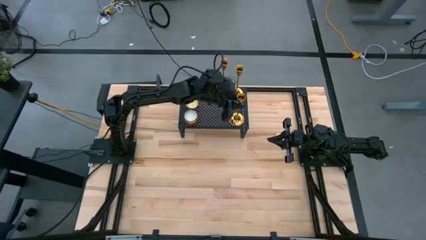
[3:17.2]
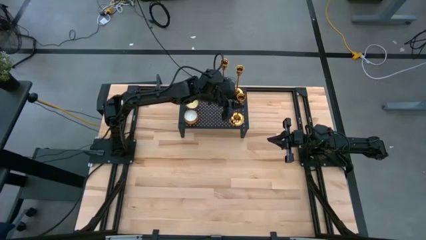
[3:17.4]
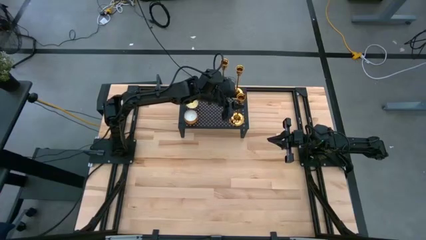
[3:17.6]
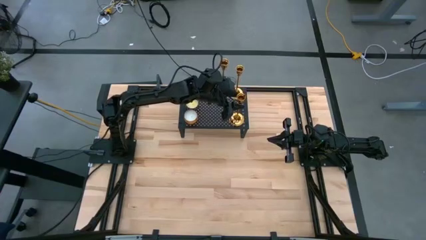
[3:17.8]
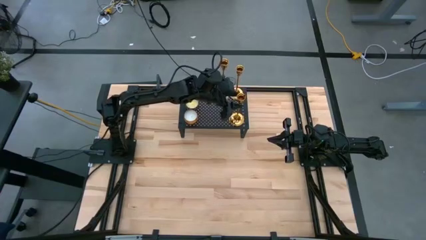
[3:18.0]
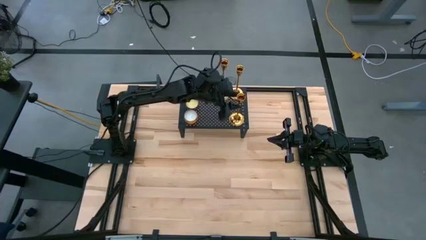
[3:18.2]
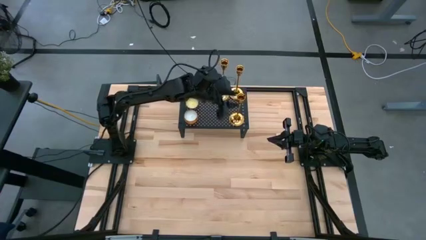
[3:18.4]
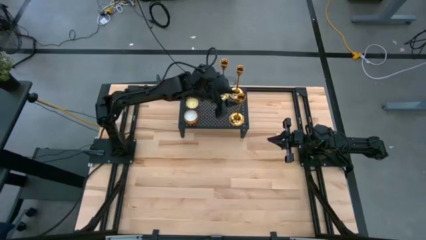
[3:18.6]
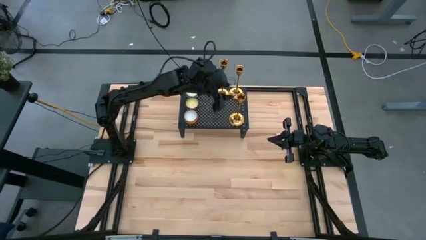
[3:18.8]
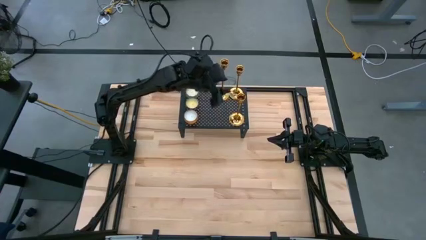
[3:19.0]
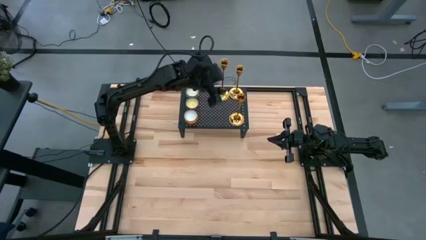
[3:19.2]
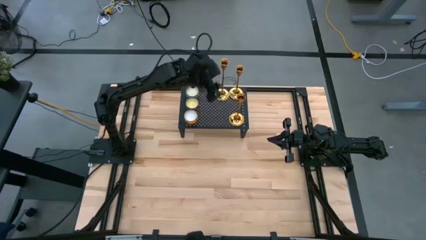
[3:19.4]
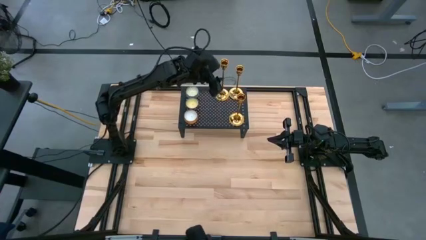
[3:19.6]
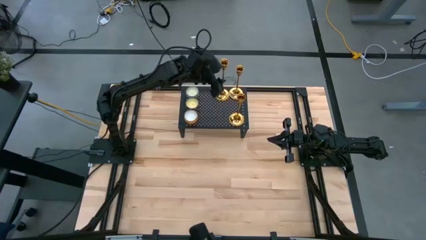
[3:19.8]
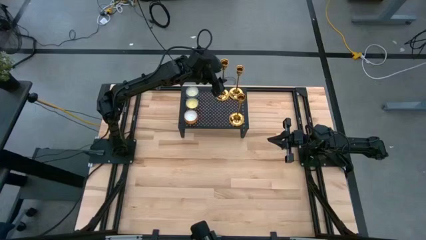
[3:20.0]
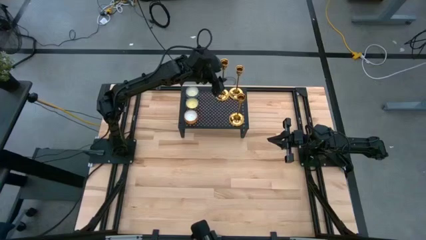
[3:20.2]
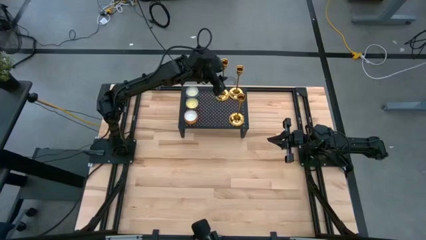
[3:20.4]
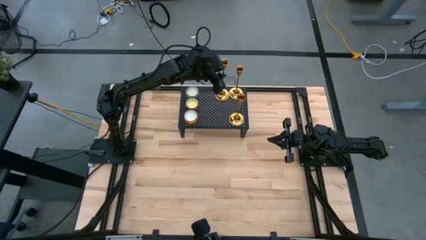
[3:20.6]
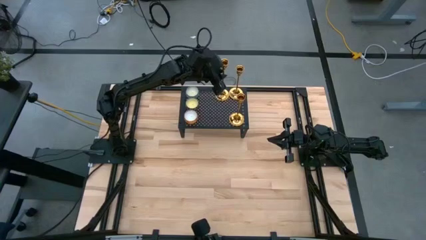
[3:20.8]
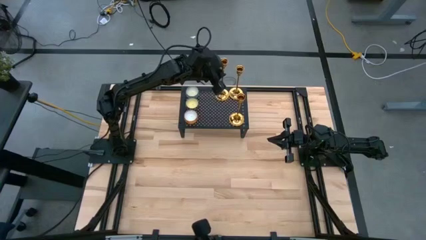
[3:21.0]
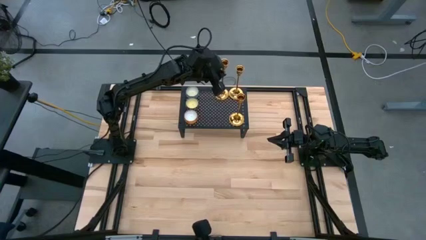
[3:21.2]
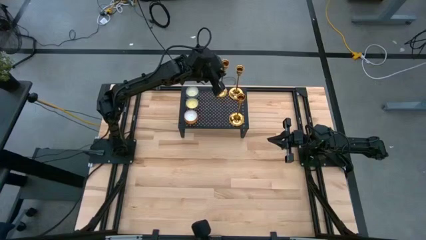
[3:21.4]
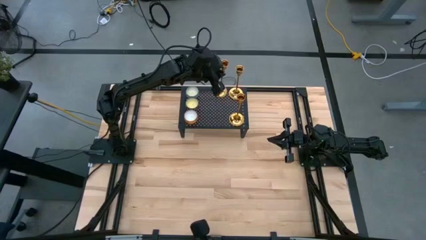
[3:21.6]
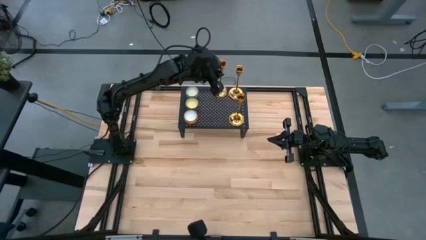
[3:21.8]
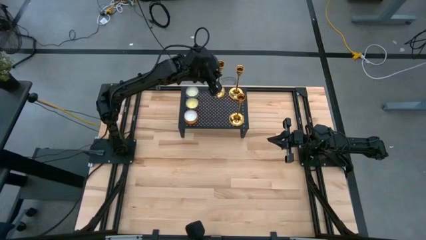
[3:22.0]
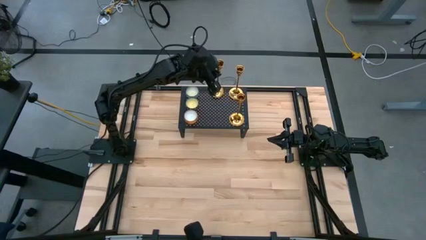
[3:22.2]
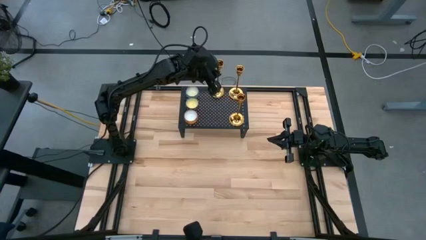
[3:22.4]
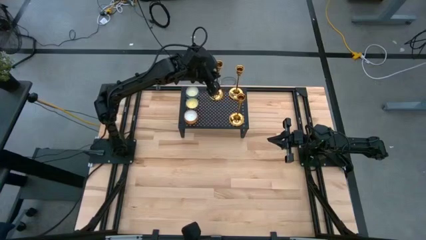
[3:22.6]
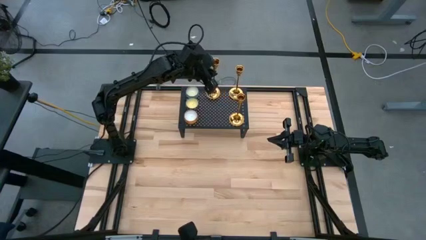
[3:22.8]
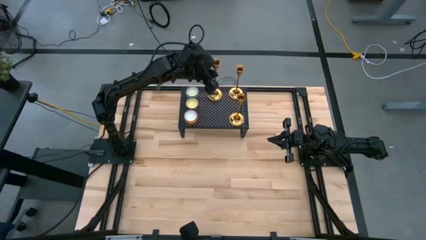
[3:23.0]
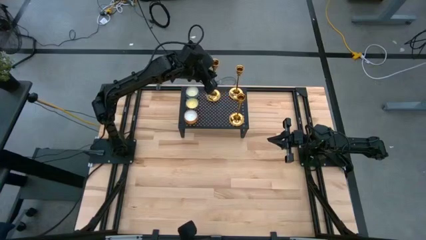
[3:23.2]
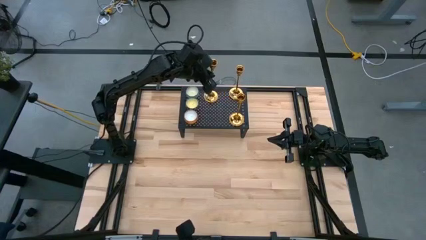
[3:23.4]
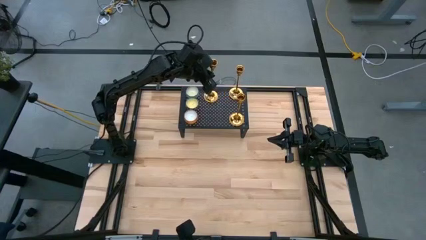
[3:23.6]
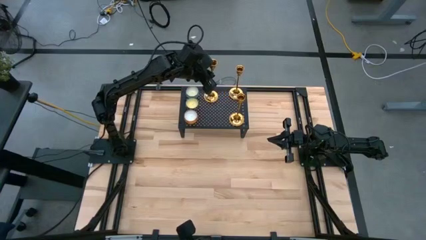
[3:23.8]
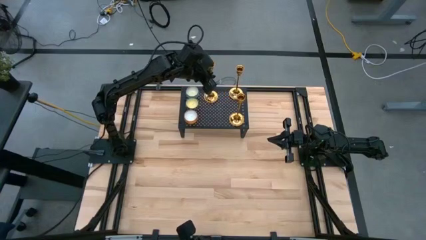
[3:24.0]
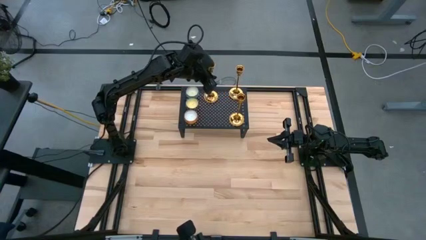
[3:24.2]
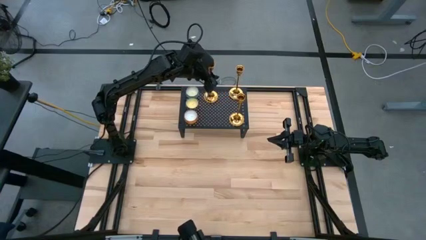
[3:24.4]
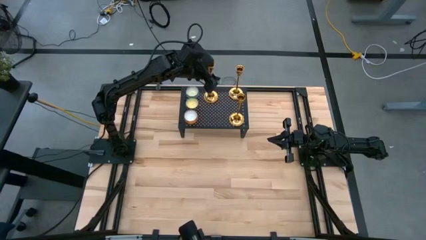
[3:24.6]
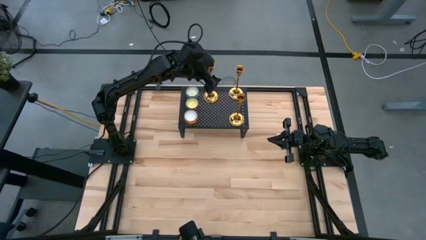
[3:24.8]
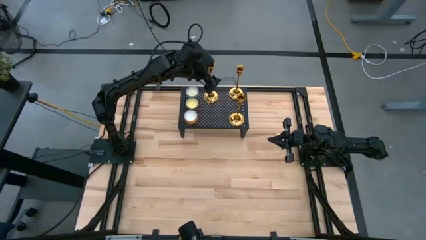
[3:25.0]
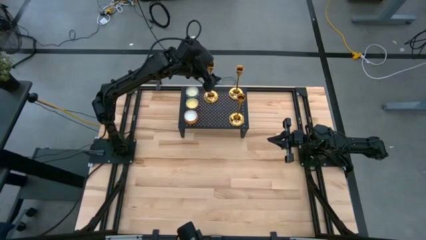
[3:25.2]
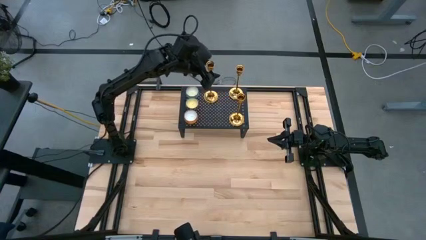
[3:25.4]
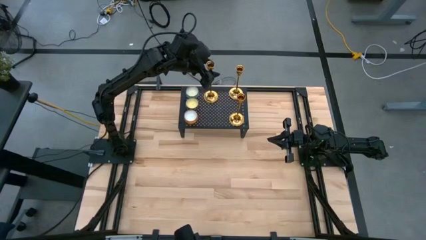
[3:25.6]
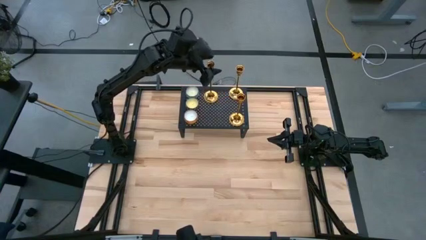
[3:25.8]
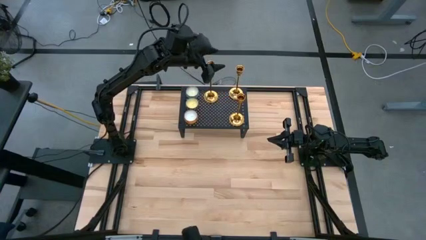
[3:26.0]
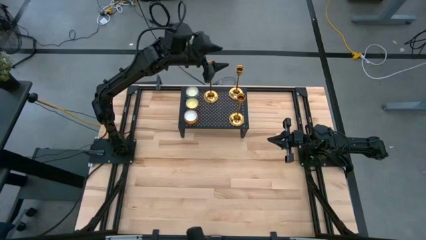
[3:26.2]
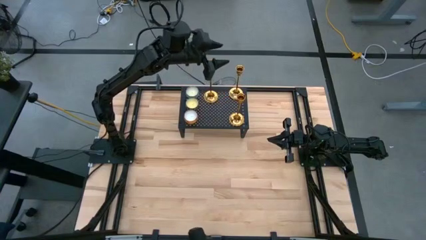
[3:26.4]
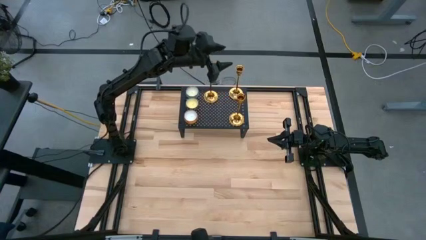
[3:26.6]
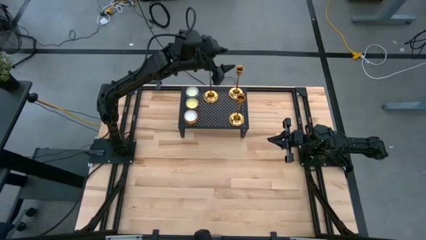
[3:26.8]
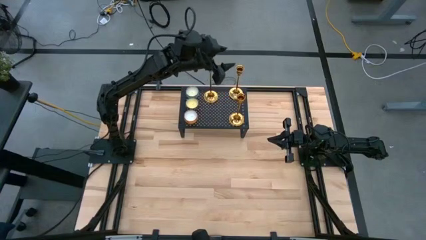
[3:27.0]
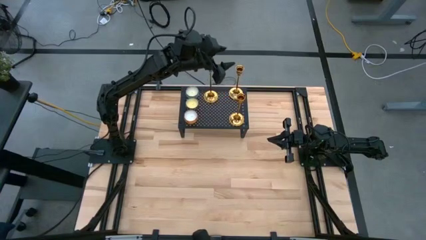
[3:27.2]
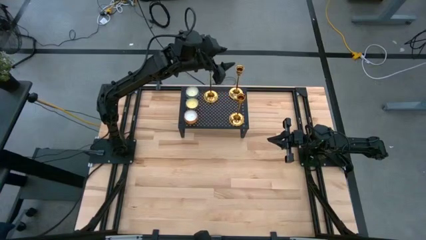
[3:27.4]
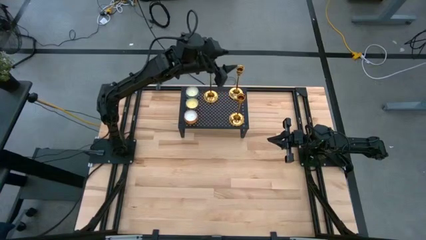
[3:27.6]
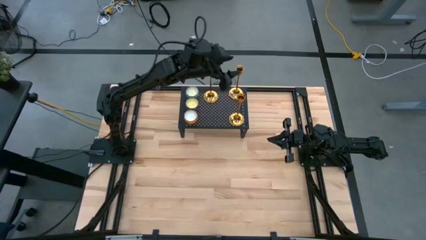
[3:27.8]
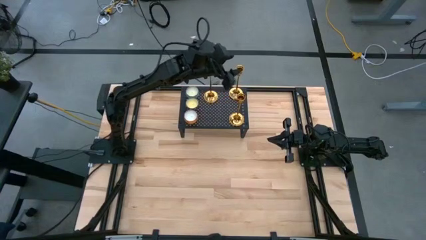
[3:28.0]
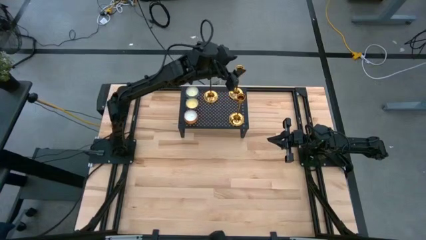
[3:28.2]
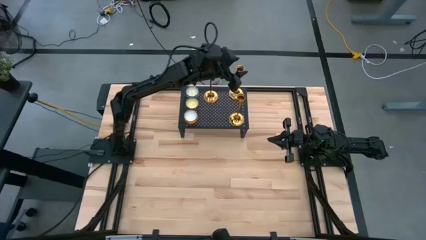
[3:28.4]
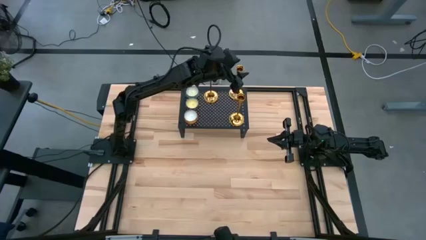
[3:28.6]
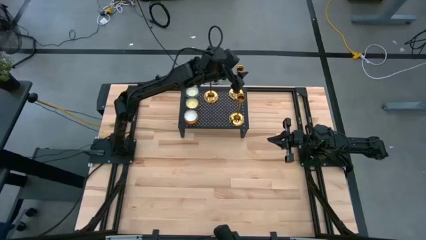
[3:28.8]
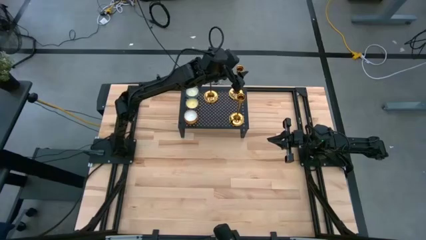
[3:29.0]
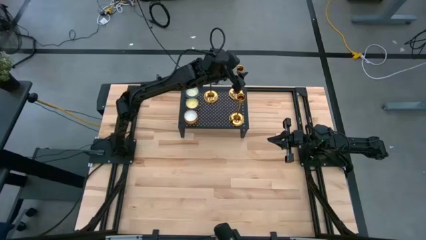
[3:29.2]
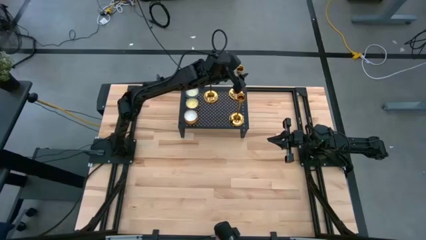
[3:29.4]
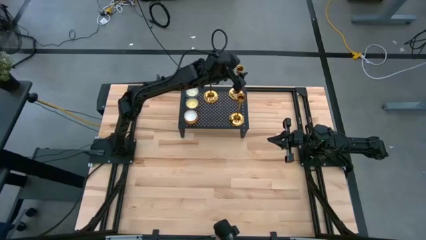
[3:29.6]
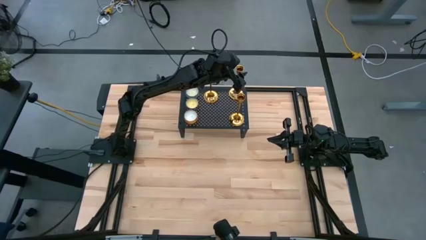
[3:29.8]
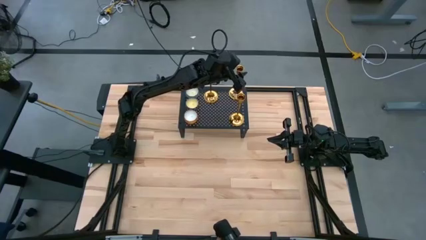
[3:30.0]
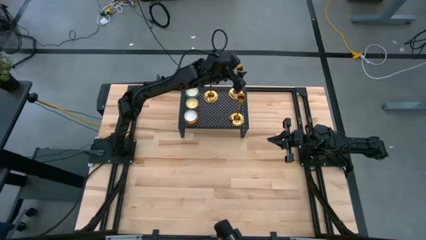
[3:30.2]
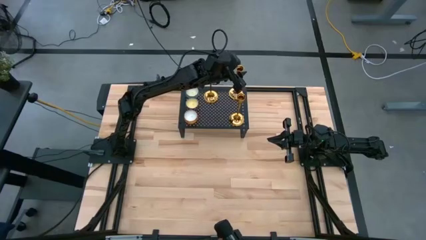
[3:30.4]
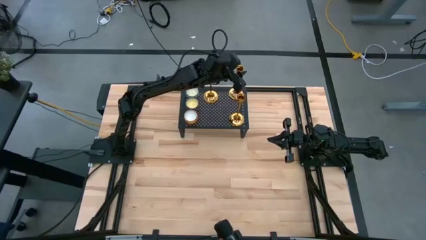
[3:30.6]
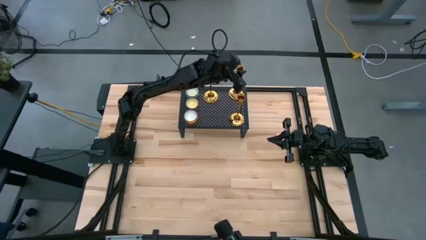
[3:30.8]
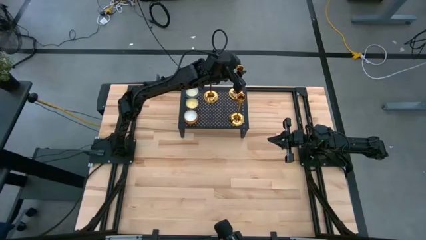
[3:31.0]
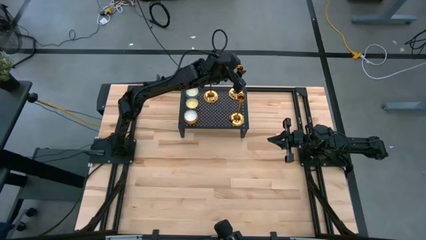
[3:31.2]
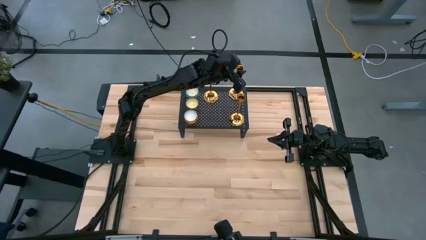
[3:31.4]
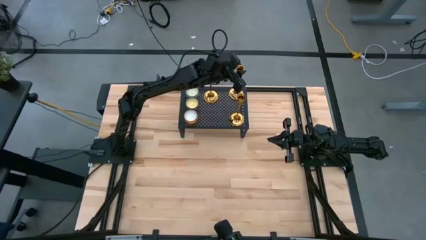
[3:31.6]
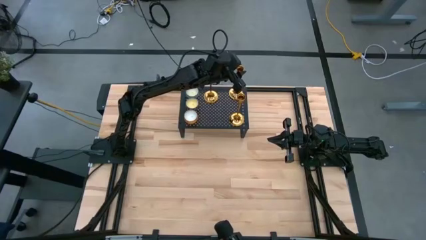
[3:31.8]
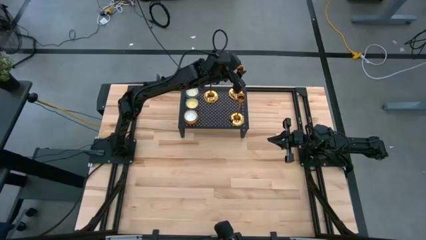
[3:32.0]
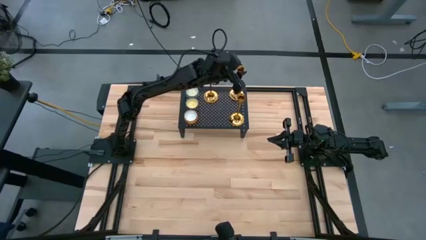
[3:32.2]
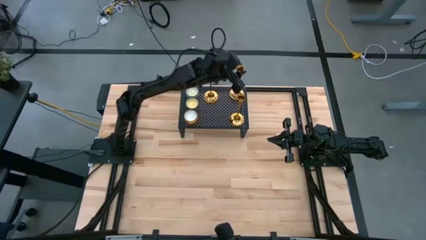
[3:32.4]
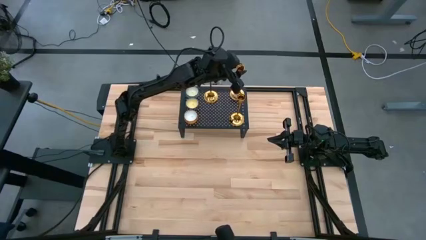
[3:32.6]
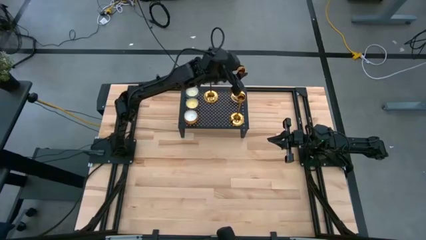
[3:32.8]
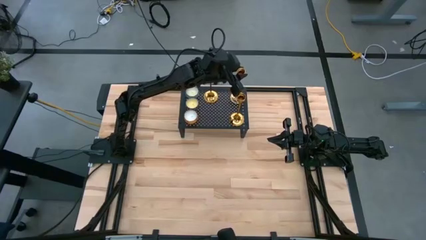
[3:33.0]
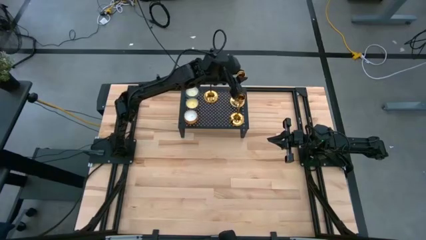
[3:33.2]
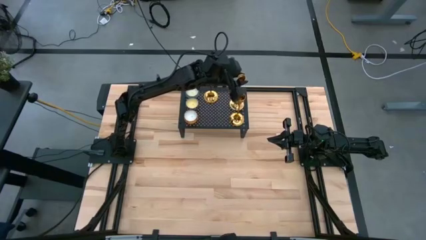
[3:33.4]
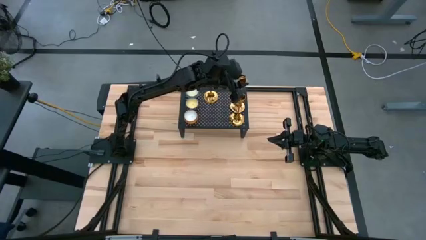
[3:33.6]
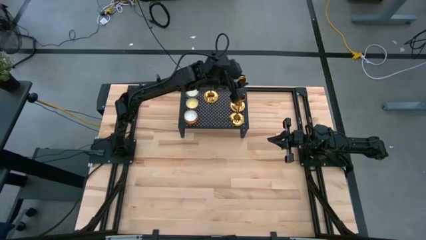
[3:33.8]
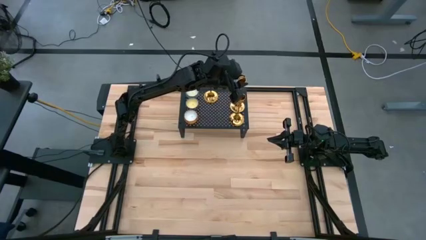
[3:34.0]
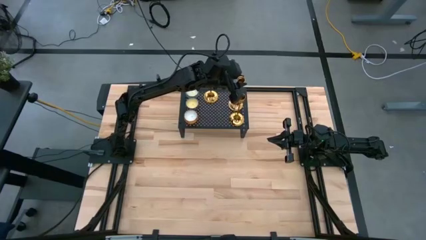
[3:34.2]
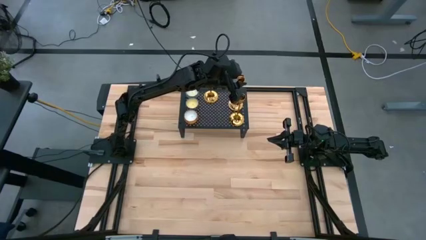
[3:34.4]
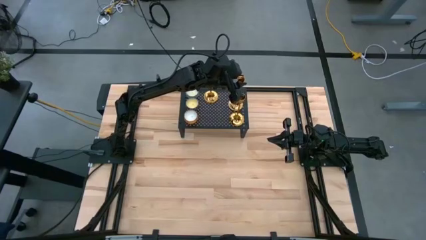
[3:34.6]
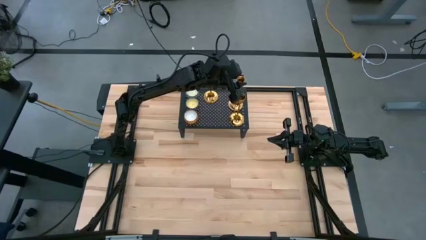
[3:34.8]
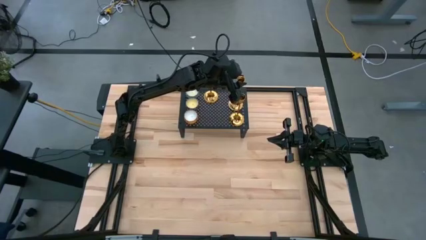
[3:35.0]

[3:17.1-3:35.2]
Task: Pick & Place candle stick holders
Adjust the candle holders on the shelf
